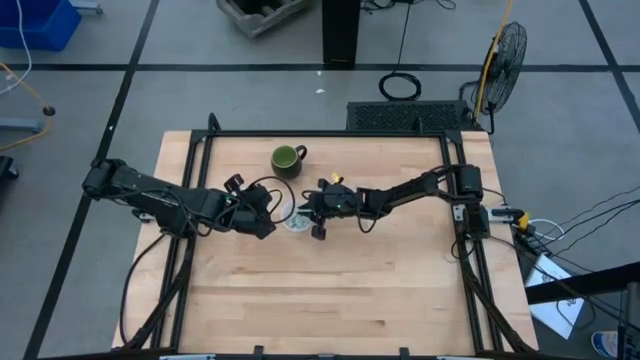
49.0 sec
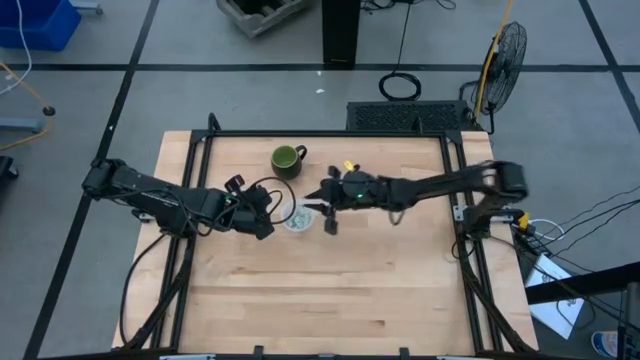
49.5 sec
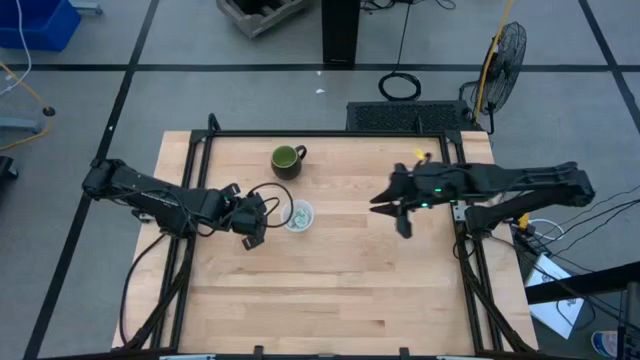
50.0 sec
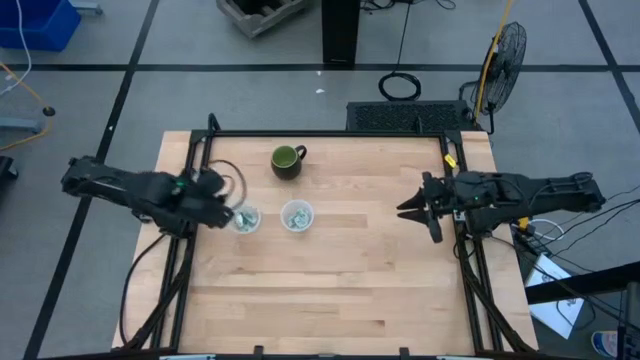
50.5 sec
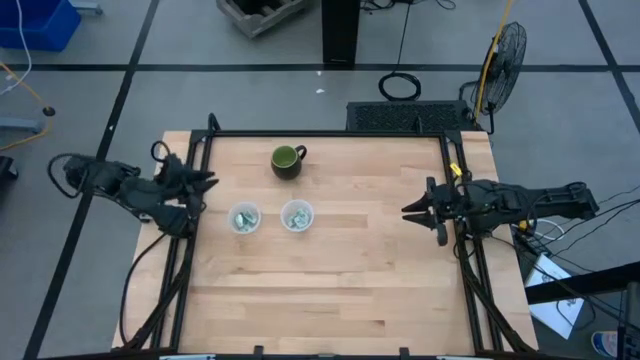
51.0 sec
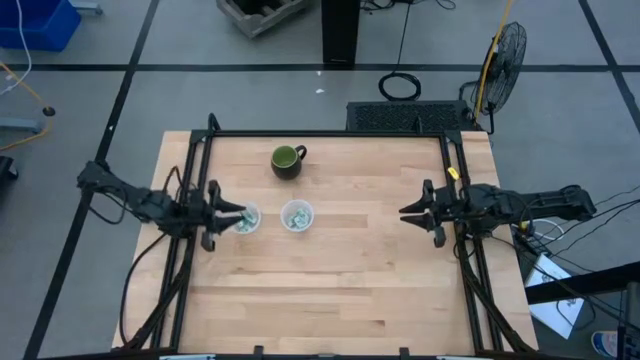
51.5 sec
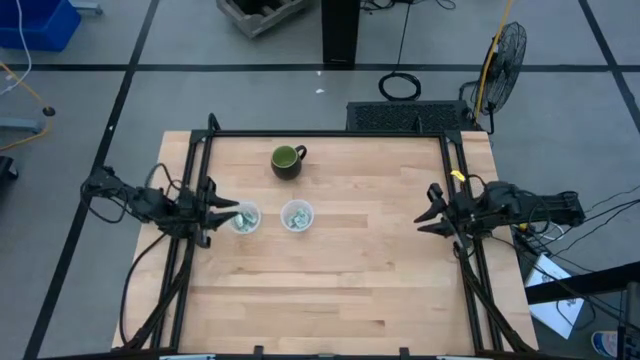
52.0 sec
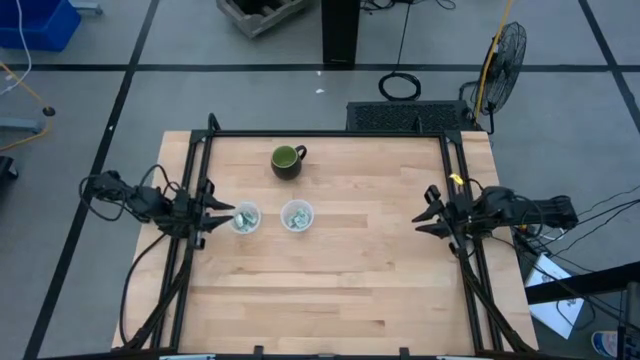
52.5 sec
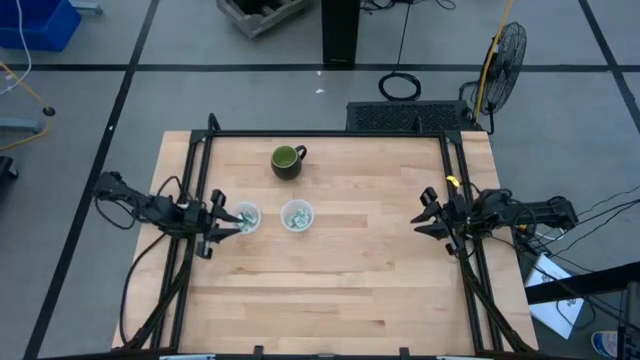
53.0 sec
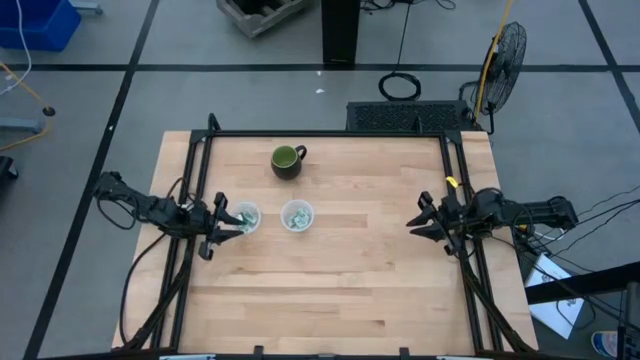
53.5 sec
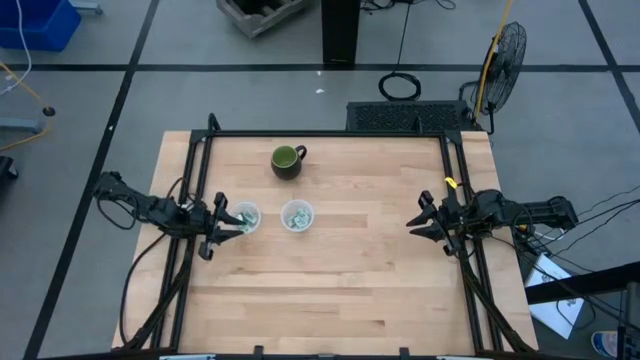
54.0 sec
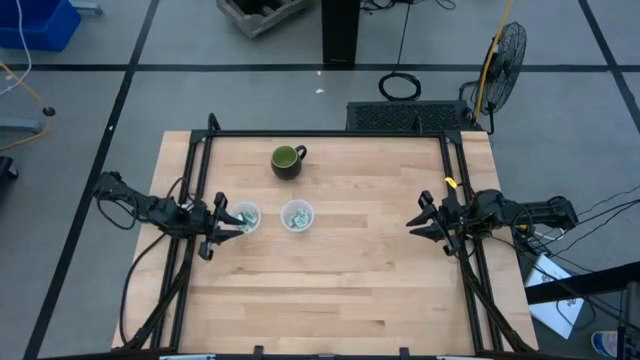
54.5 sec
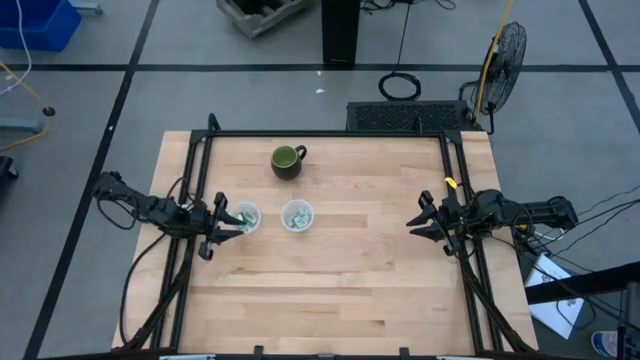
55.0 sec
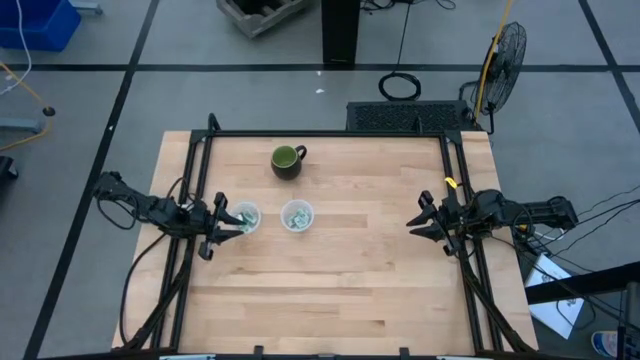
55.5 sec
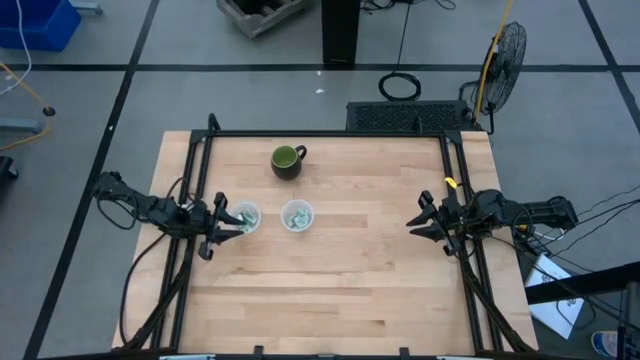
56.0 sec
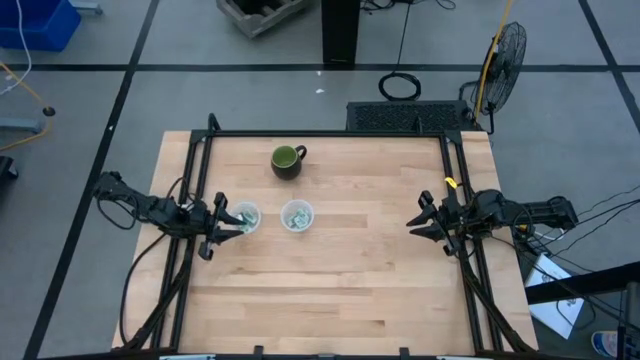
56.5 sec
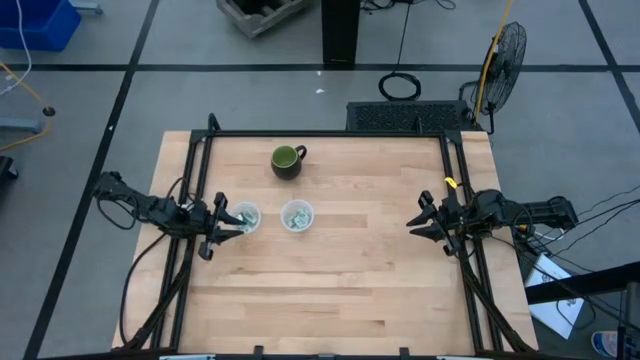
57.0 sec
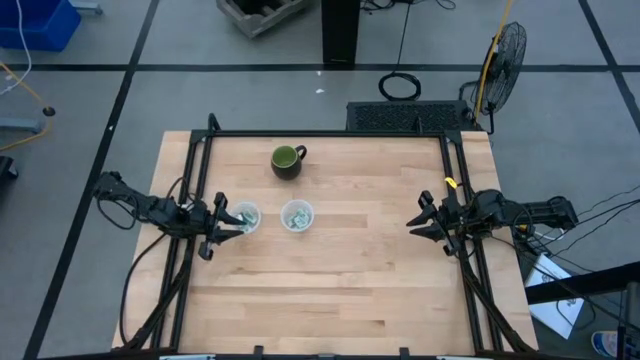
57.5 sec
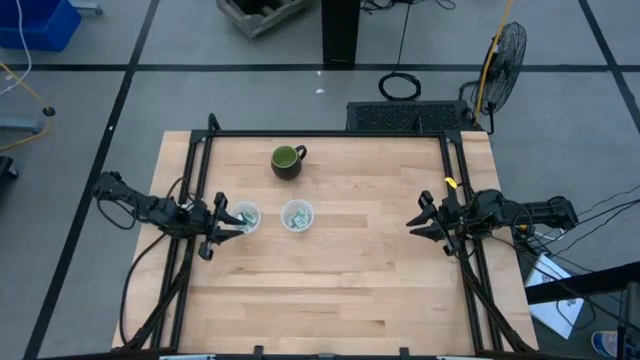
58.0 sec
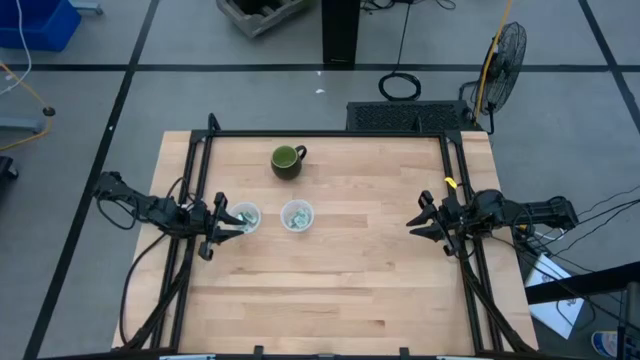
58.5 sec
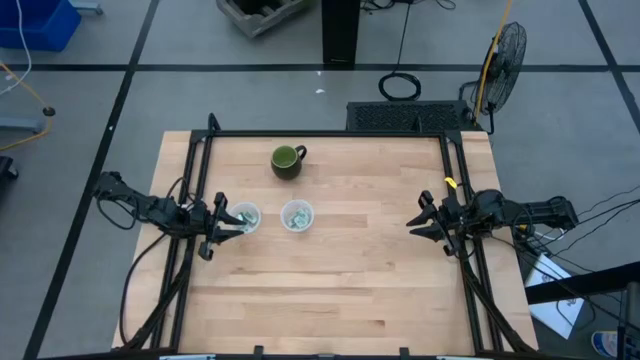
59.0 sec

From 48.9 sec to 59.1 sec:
Task: Pick and place Stevia / Truvia into bins
Return to Home Position

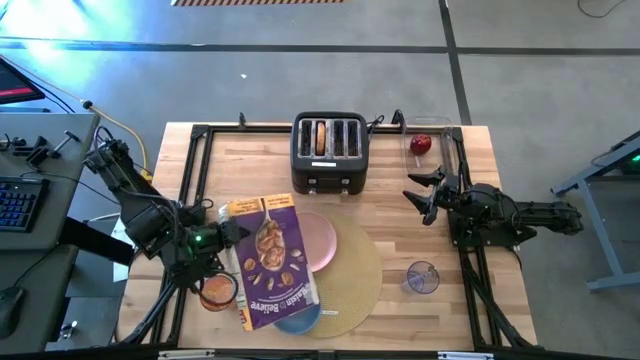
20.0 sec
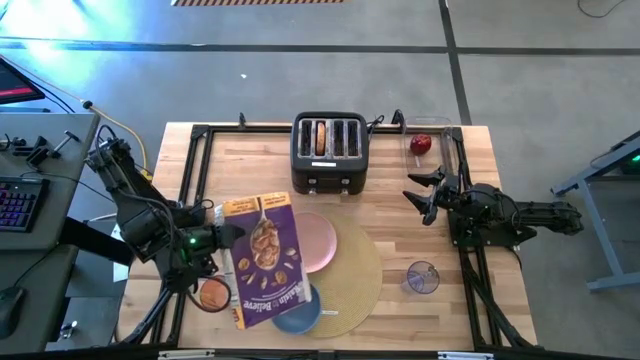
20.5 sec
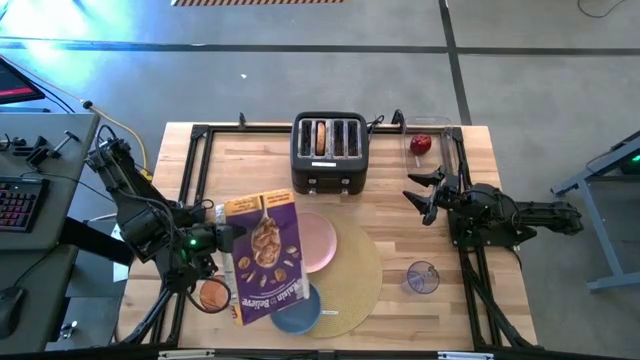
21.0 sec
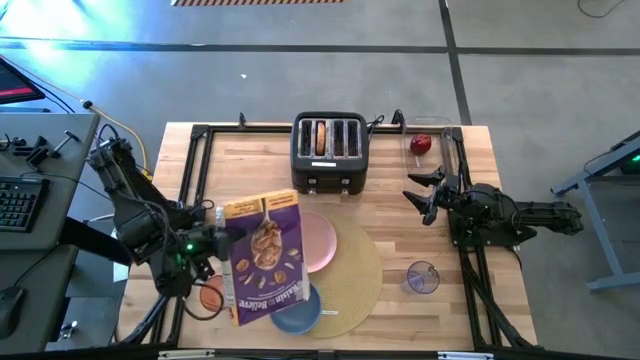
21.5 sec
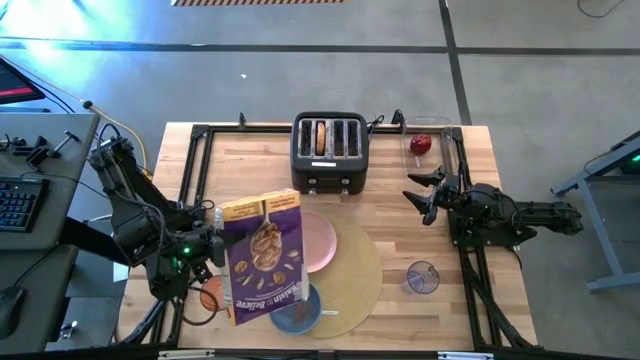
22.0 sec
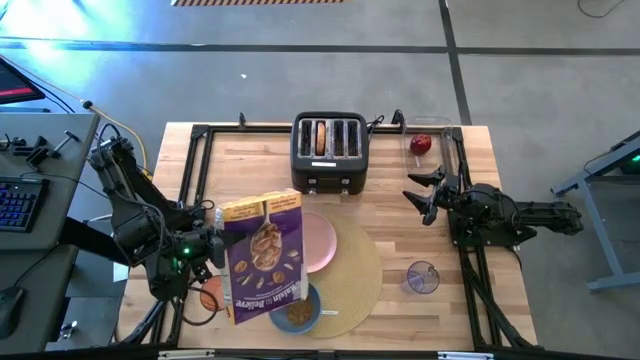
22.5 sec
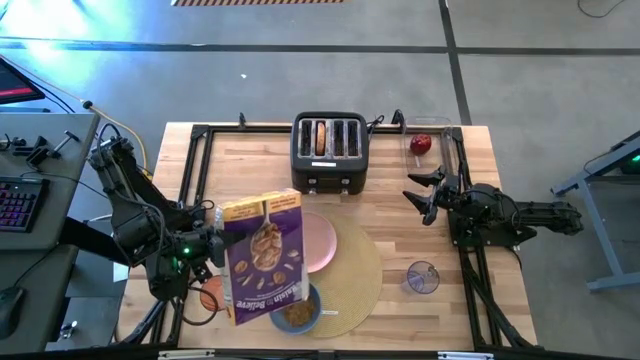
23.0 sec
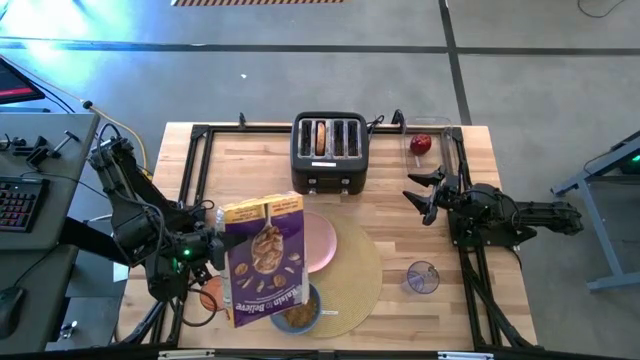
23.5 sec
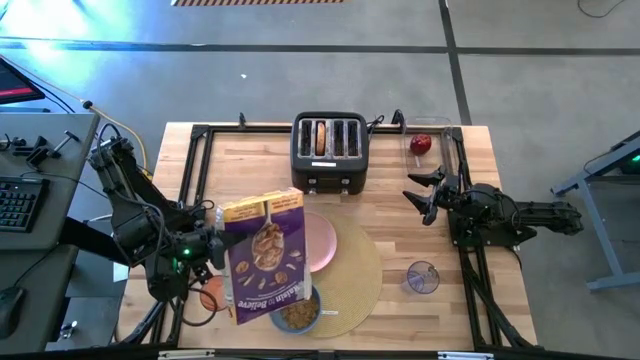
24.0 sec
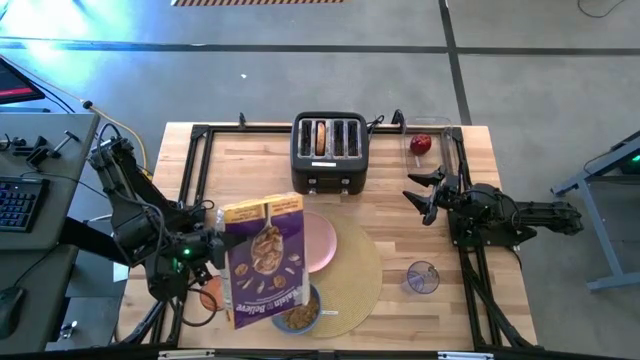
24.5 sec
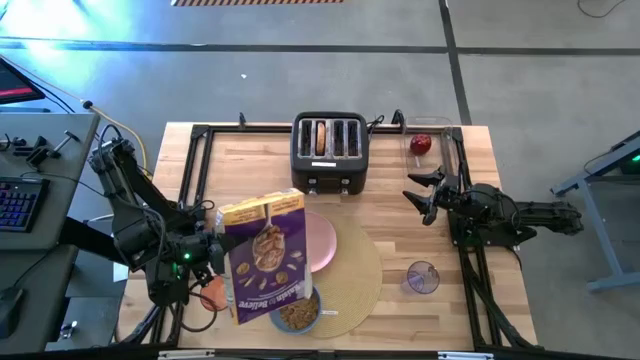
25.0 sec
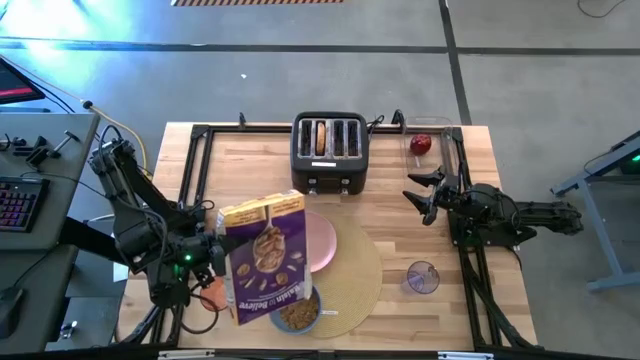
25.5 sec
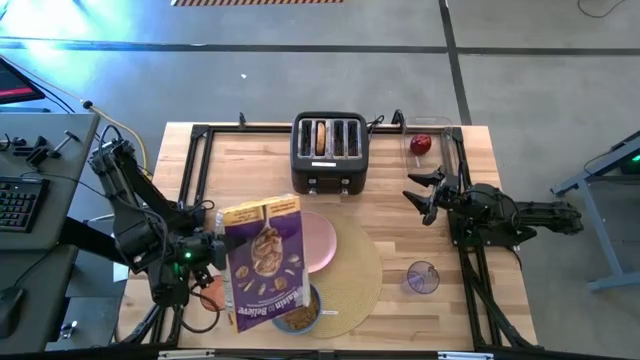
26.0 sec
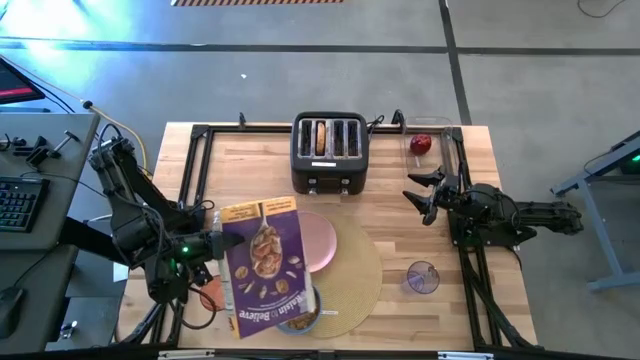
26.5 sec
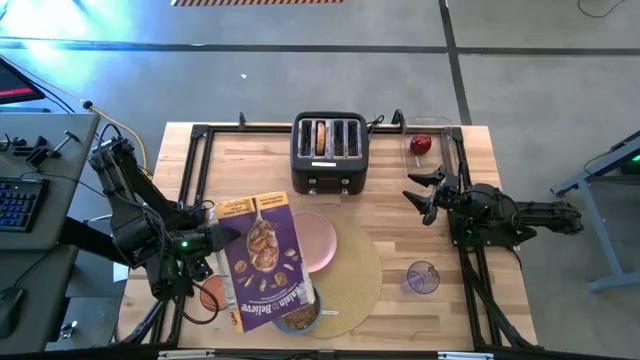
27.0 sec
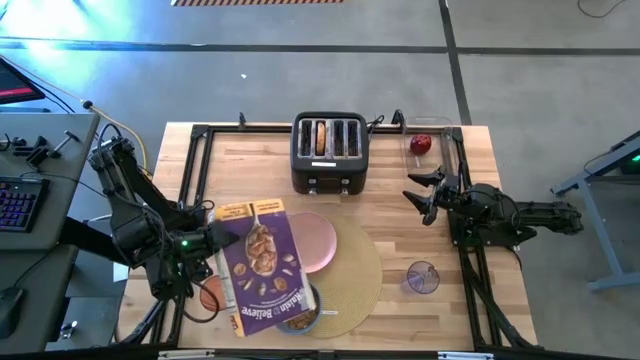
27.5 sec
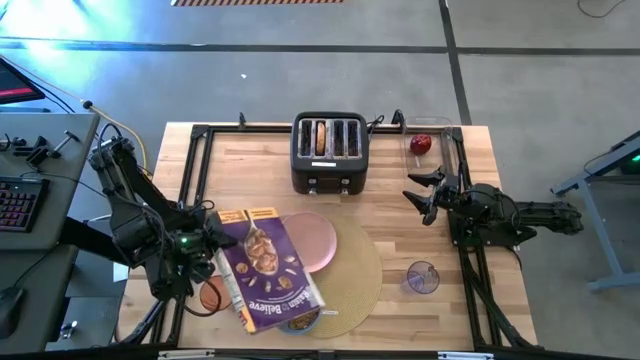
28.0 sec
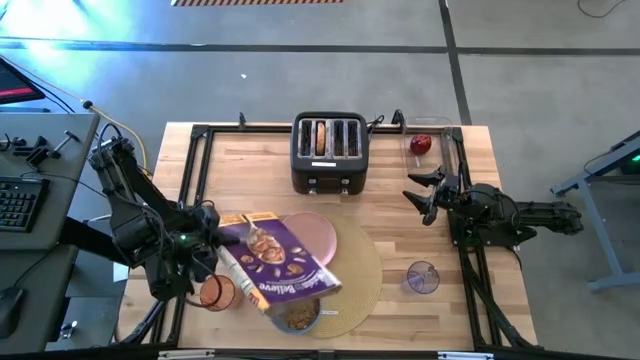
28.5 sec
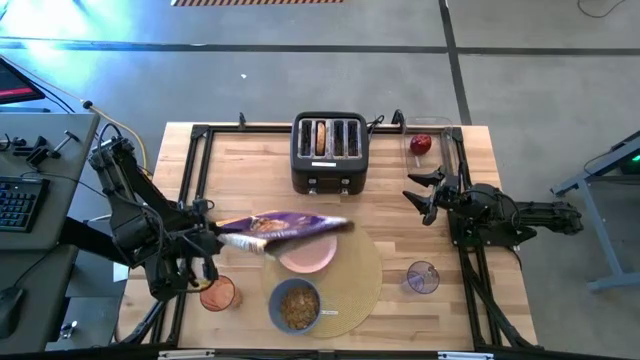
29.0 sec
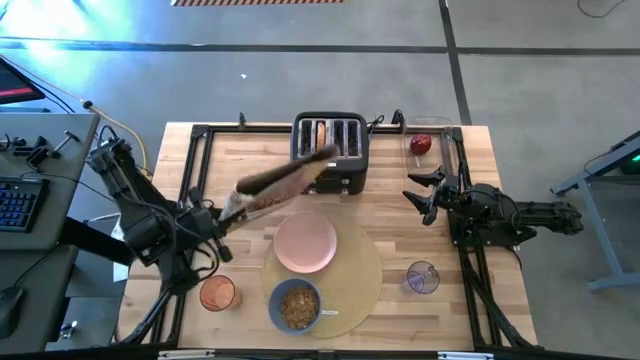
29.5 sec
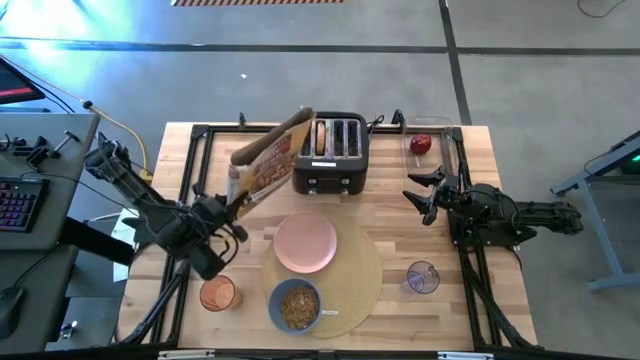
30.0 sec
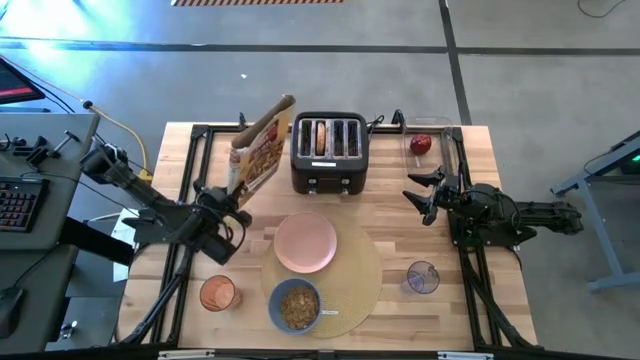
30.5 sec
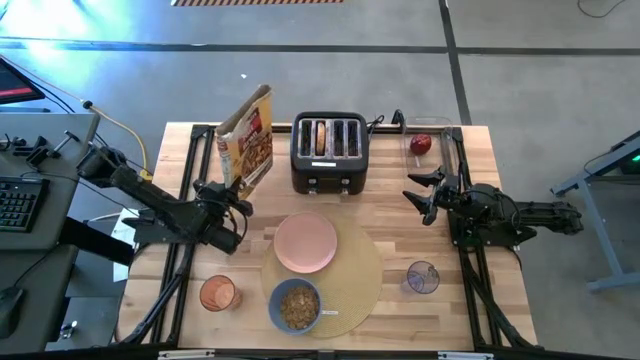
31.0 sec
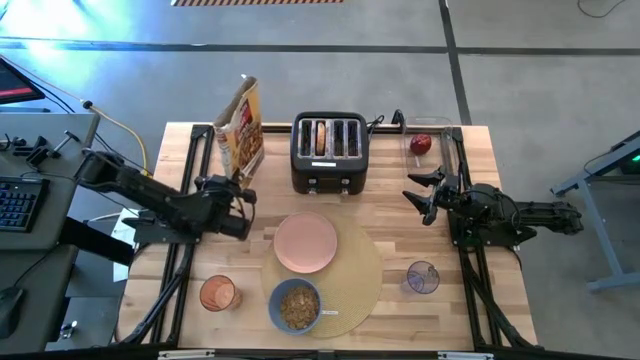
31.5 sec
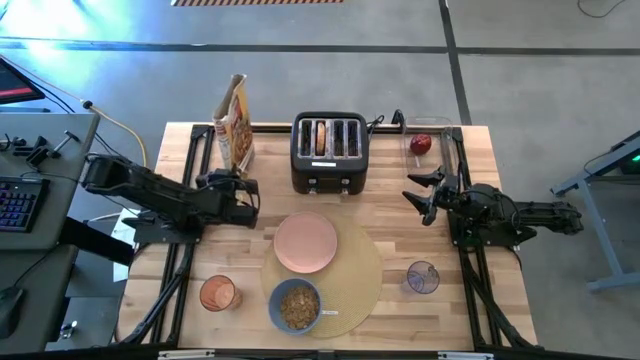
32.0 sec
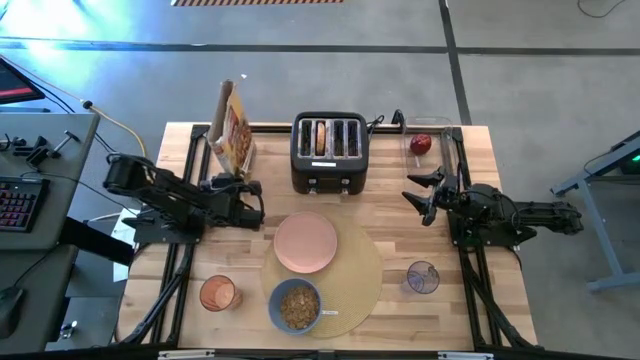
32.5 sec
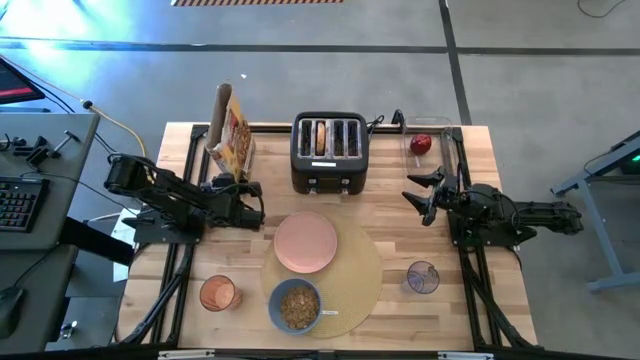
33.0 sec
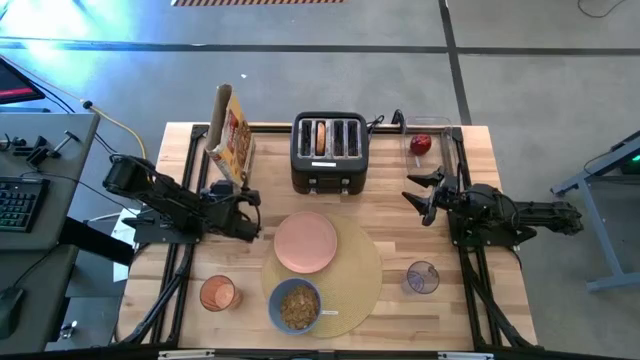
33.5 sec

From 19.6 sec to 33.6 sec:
Task: Arrange a breakfast setting
Pour the cereal into the bowl
